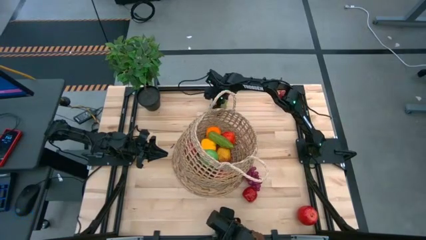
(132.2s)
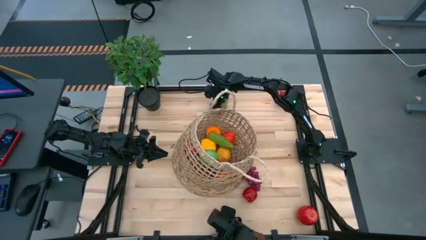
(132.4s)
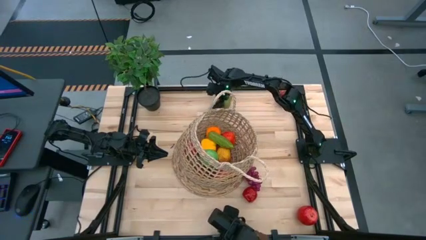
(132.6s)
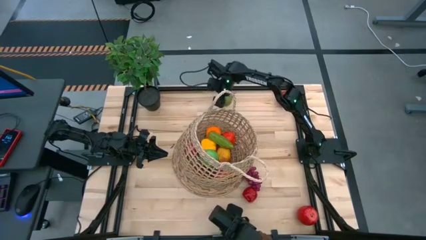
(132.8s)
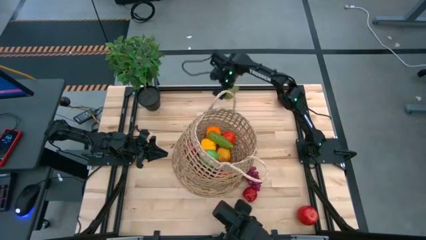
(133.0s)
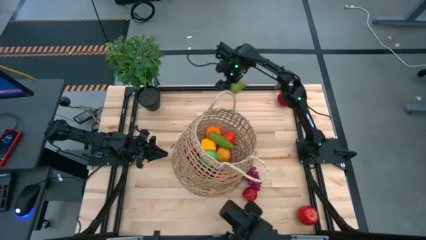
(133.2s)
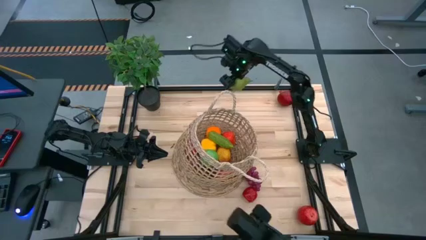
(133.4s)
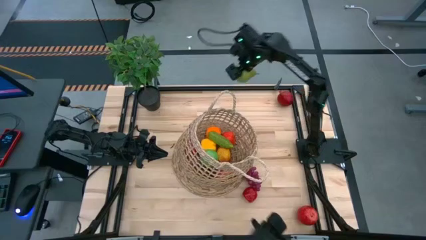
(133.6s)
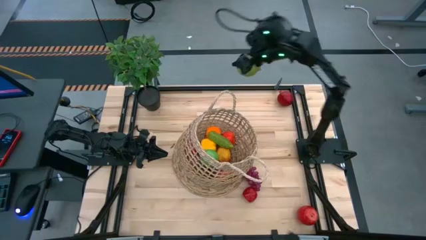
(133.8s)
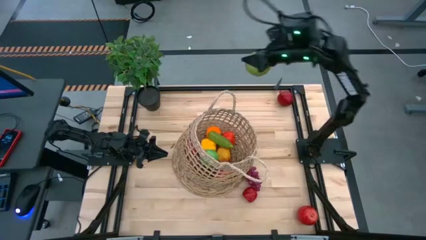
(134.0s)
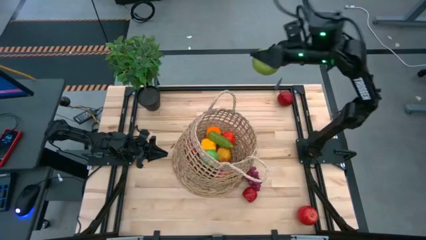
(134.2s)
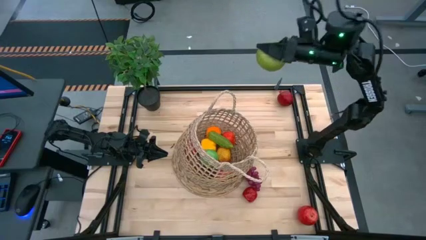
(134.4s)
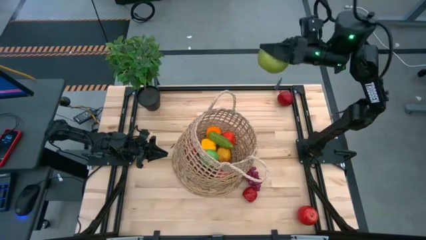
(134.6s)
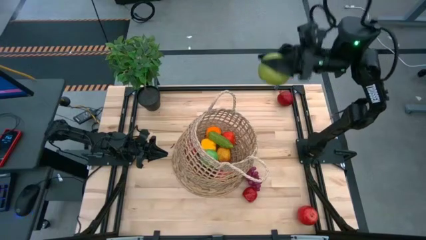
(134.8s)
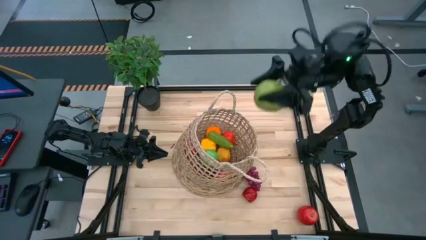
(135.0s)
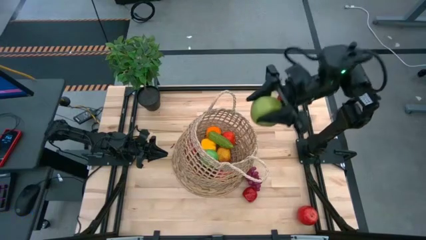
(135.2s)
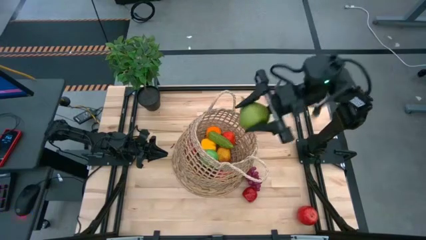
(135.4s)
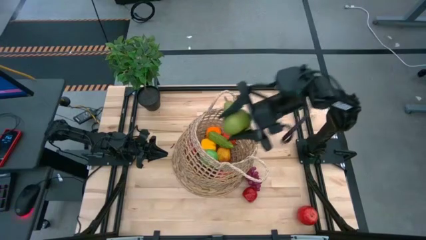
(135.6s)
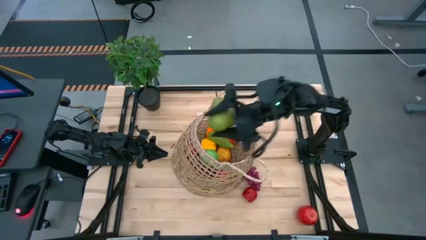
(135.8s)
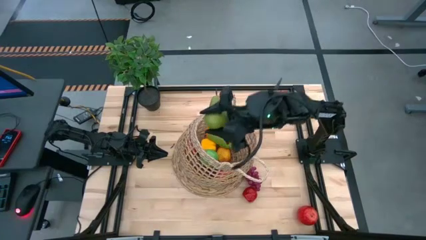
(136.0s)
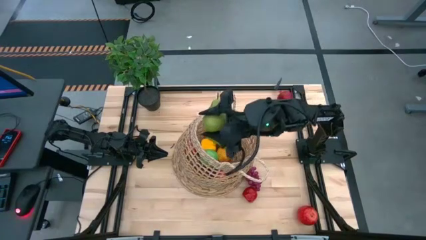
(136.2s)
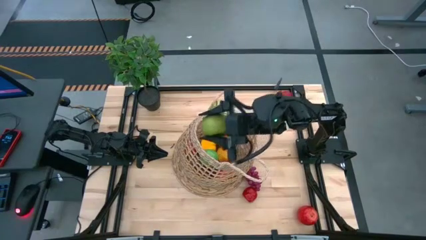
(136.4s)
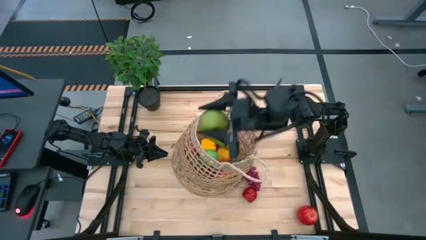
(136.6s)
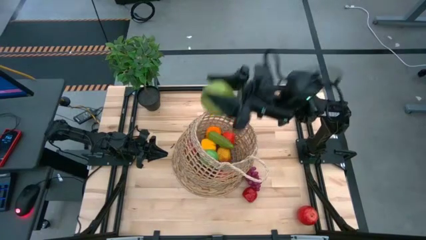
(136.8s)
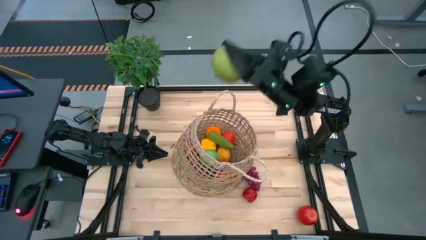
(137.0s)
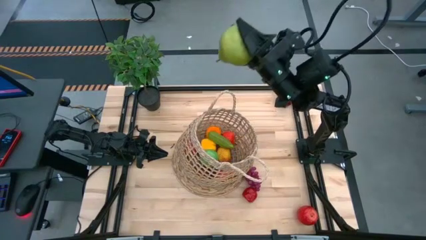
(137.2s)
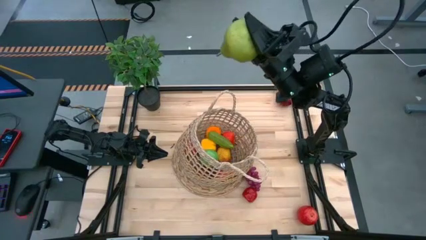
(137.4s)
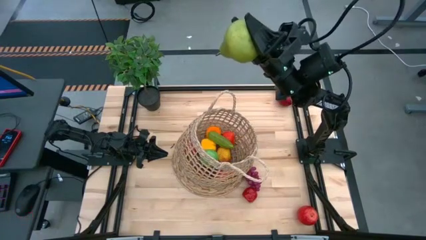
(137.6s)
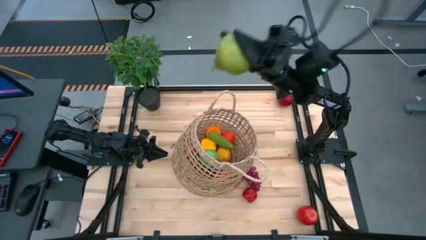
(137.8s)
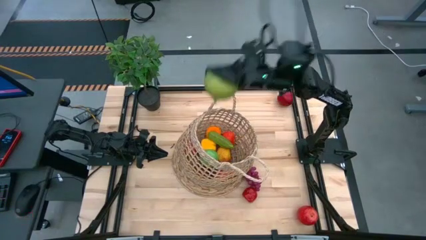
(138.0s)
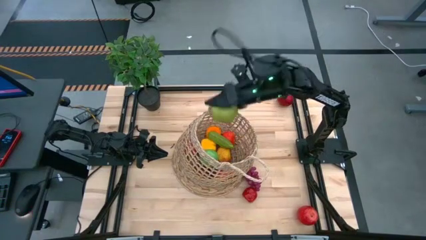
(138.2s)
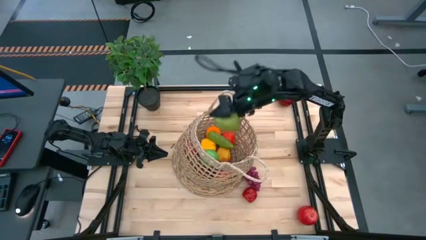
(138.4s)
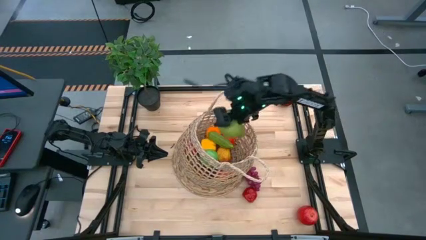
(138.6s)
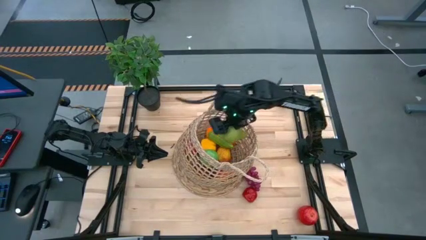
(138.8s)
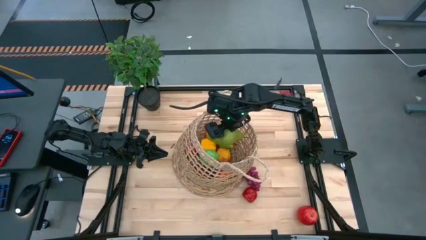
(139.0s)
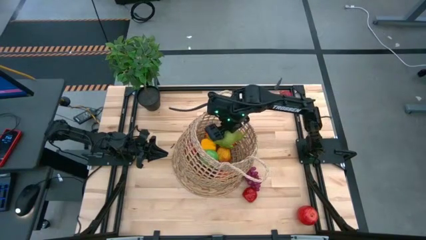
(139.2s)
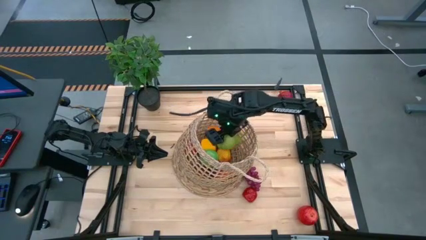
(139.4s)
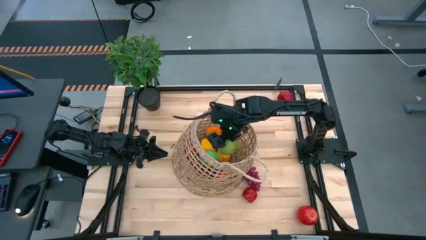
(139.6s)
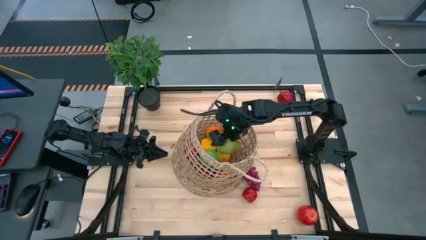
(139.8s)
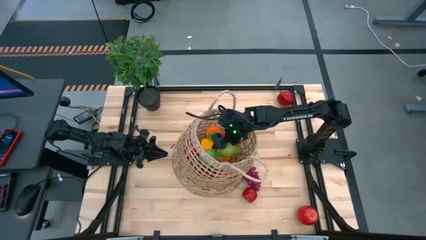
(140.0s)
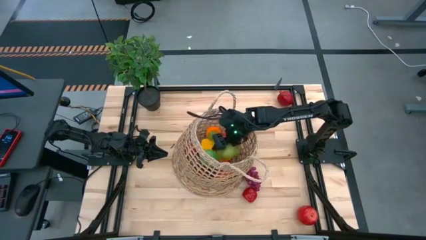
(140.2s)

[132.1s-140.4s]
Task: Build produce basket
Put the green pear into the brown basket

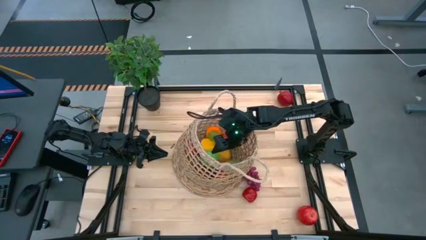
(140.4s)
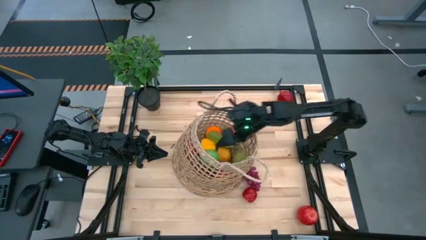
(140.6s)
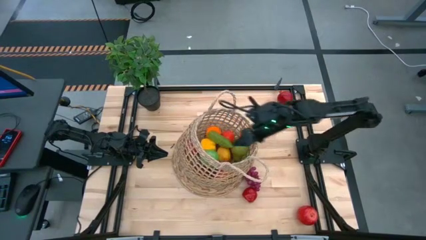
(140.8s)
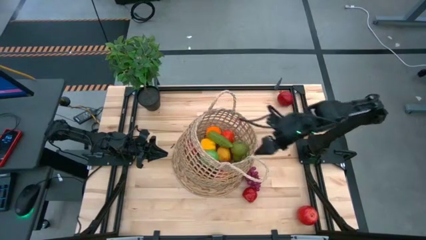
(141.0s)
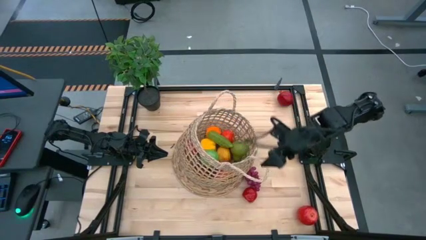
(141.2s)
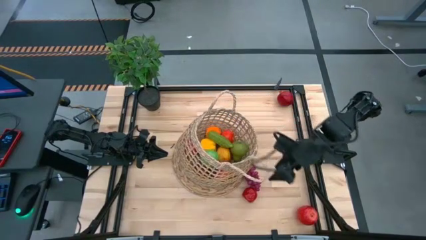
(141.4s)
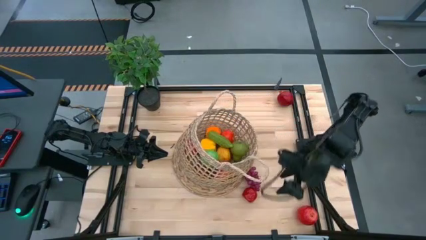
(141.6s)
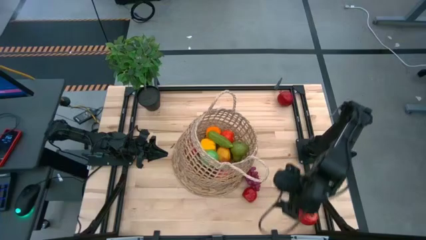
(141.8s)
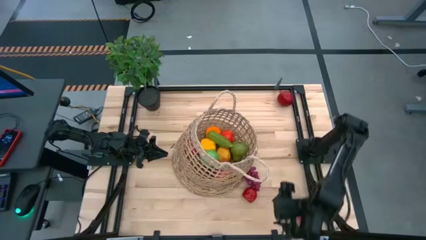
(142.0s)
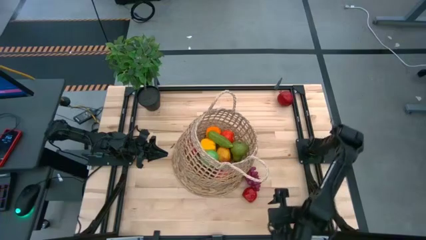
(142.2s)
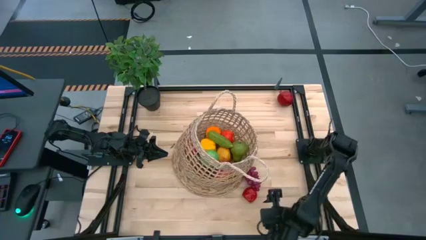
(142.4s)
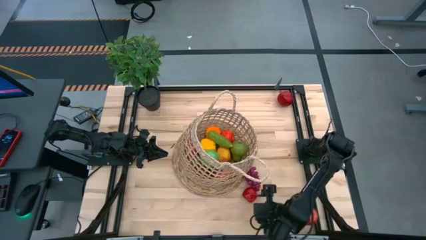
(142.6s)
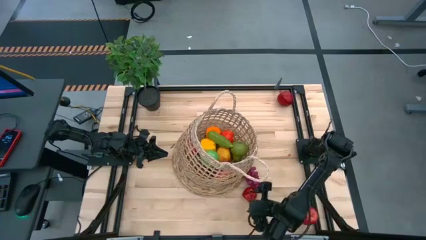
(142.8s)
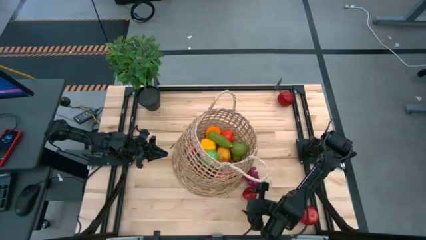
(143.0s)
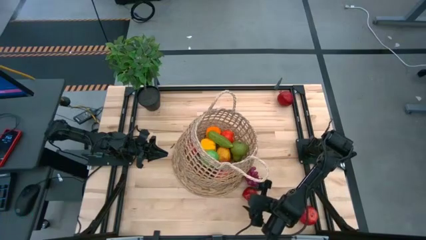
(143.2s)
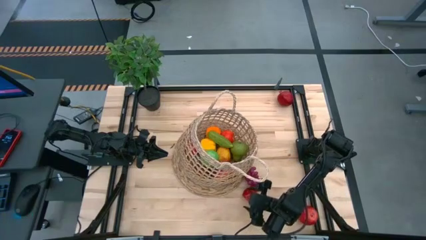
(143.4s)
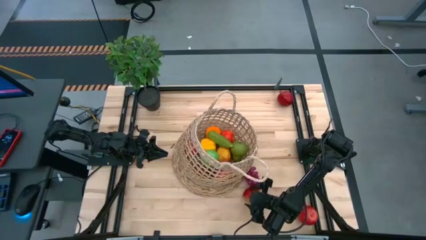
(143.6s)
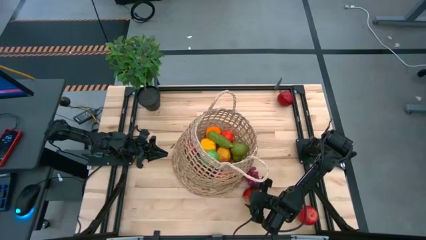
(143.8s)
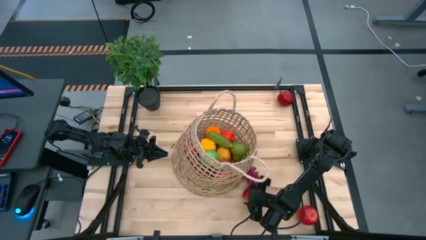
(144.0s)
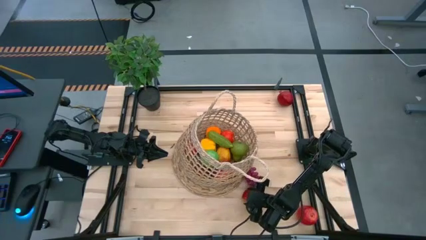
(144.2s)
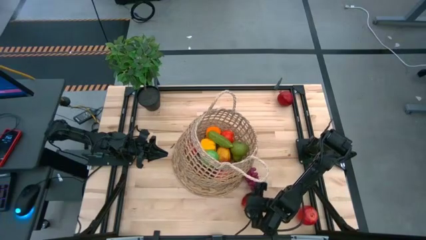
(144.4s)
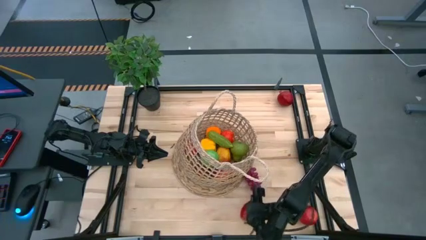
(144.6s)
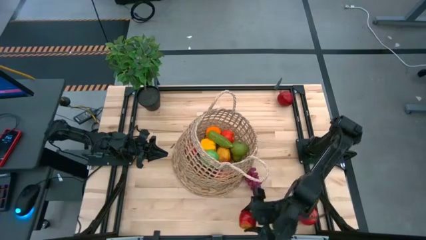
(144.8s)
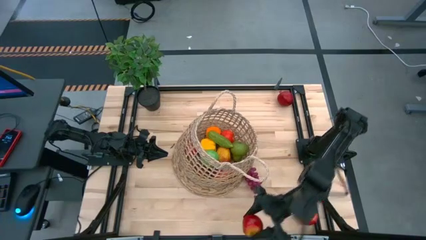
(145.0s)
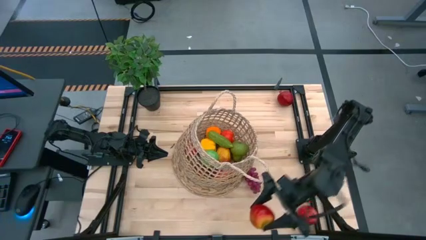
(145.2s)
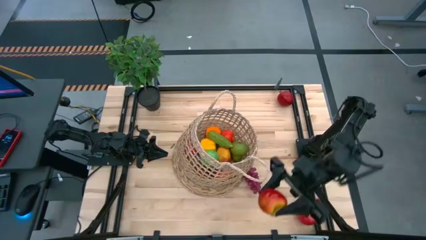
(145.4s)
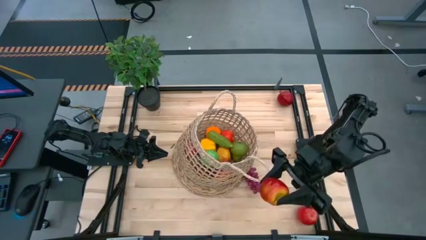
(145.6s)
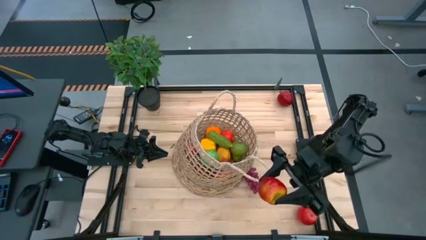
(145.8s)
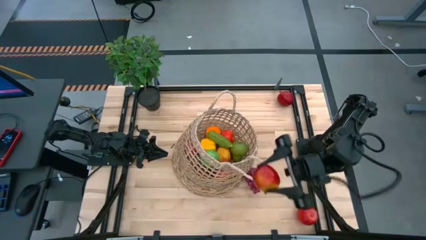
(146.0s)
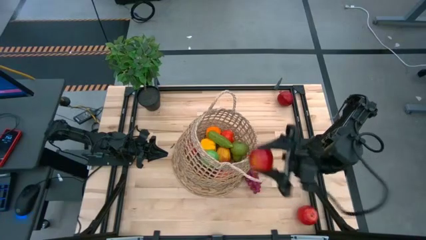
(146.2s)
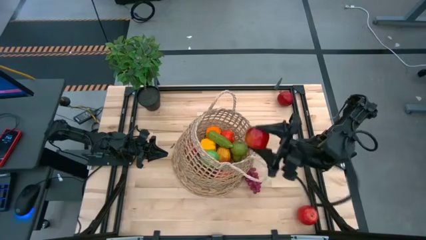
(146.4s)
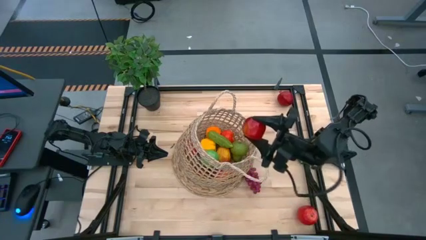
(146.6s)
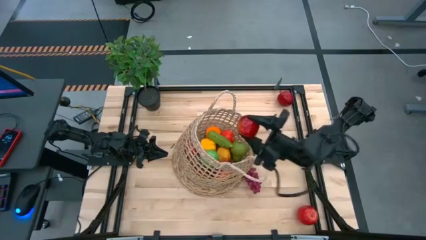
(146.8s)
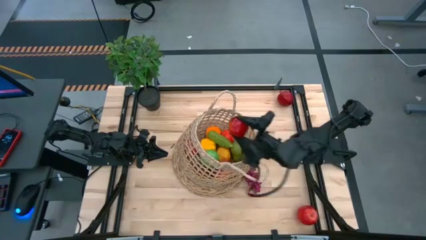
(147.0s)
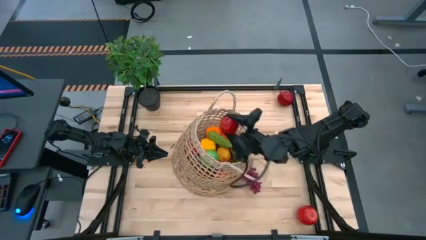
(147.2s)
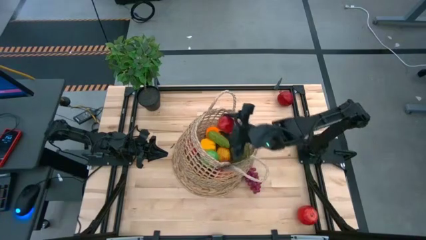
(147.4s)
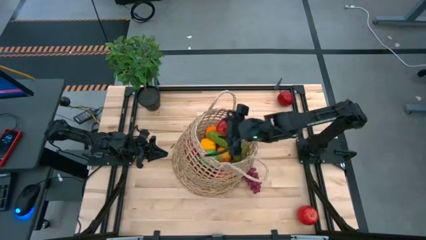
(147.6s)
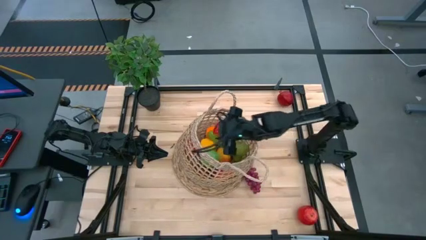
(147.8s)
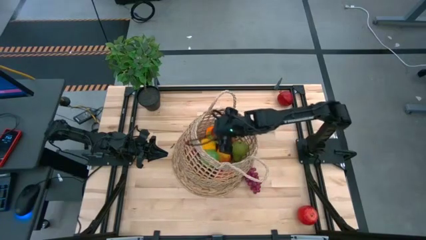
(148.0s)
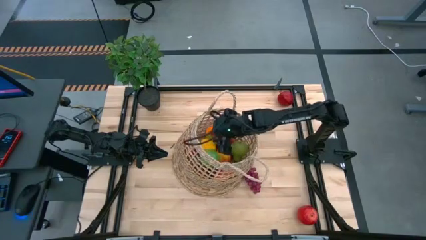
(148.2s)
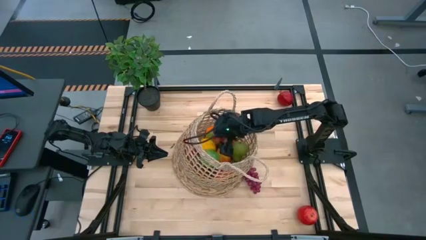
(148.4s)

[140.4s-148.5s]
Put the red apple into the brown basket

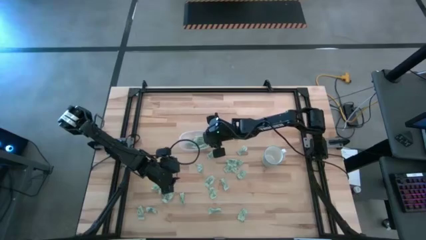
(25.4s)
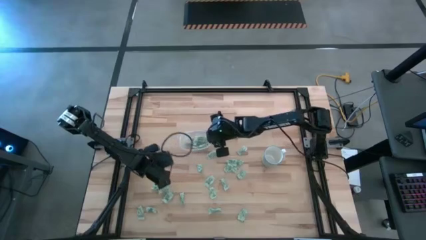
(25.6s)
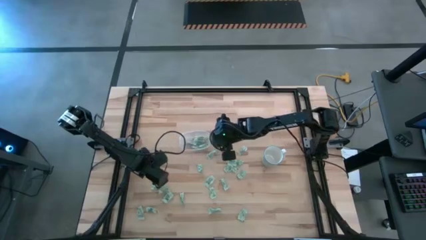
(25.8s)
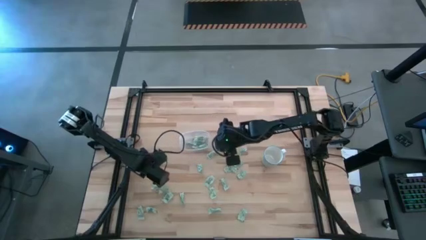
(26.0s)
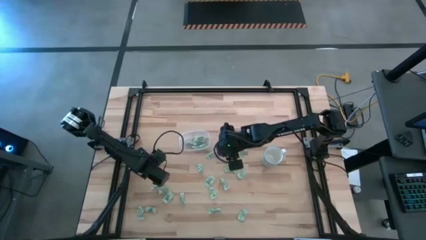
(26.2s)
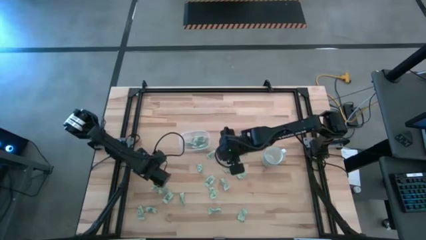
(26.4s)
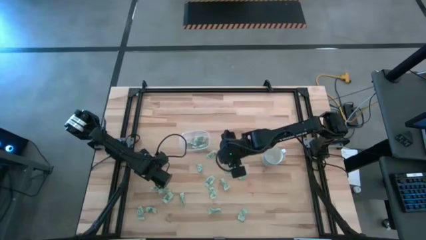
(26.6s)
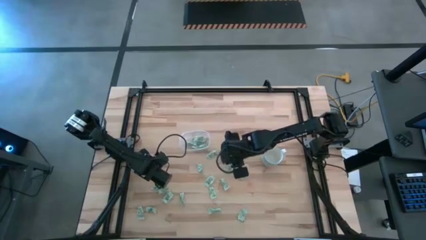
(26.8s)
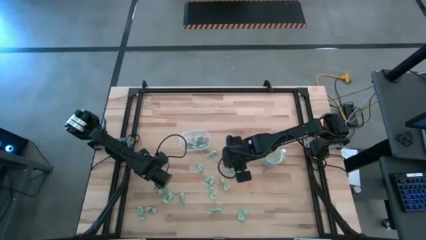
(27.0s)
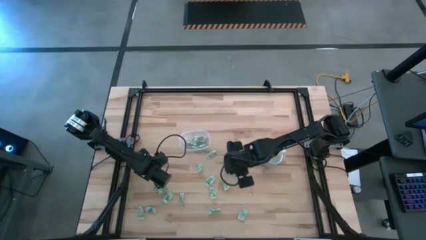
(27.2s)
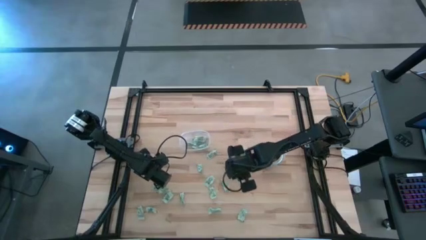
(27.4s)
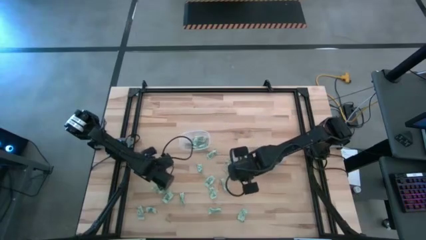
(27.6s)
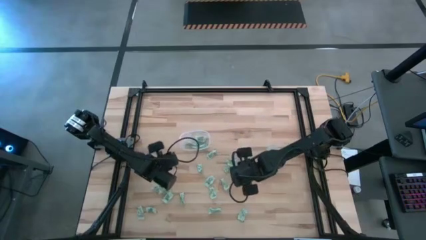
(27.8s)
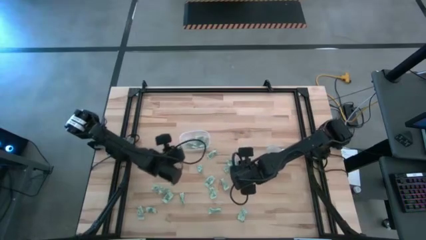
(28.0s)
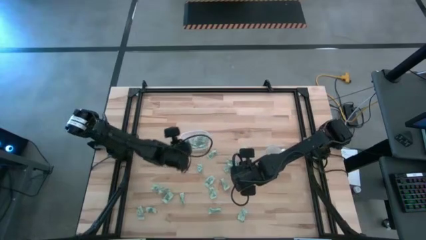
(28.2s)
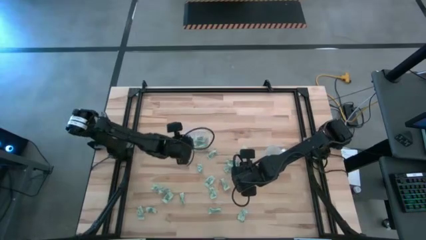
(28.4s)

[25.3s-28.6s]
Task: Pick and place Stevia / Truvia into bins
Put the stevia packet into the transparent bin
